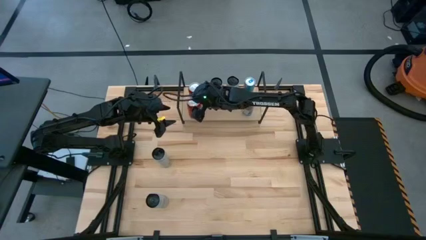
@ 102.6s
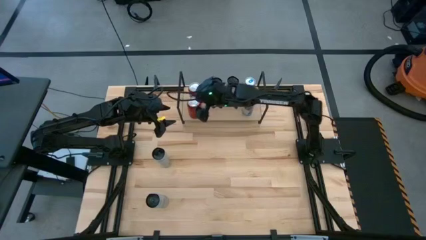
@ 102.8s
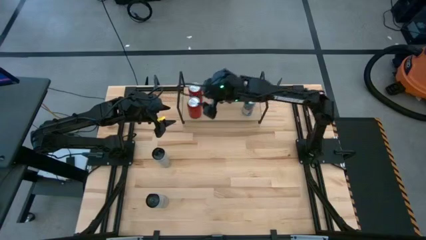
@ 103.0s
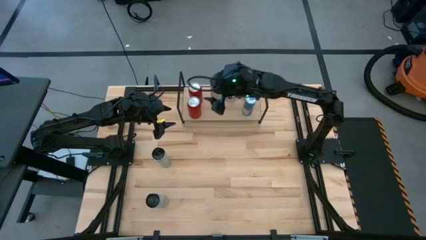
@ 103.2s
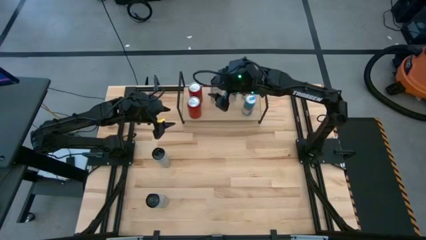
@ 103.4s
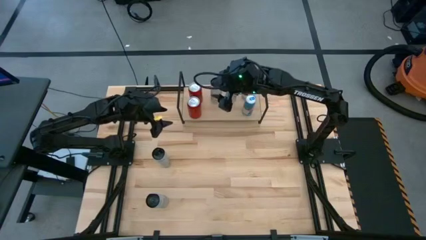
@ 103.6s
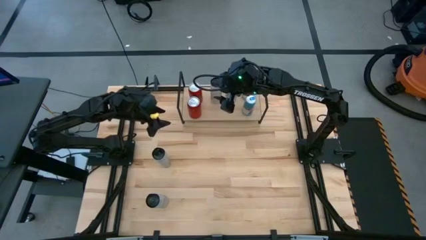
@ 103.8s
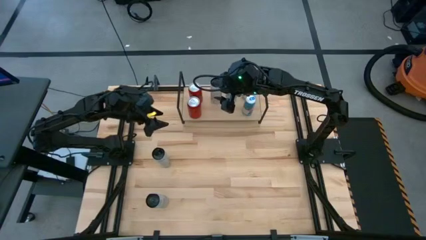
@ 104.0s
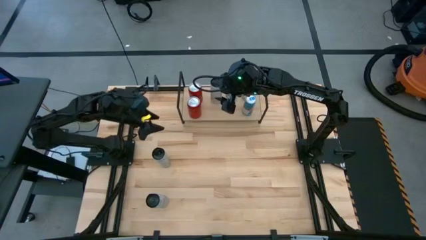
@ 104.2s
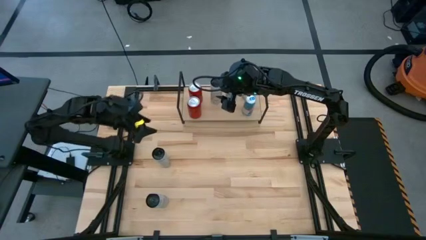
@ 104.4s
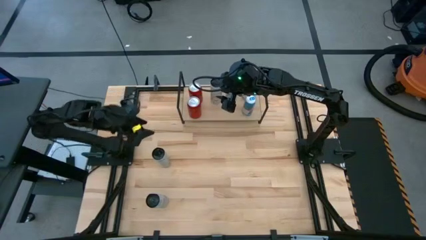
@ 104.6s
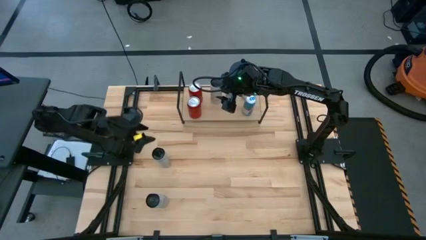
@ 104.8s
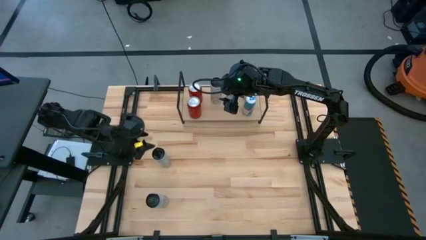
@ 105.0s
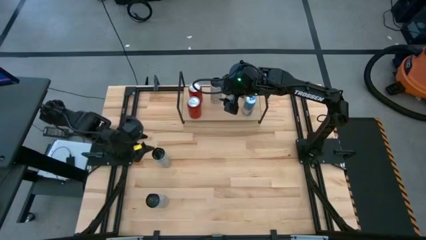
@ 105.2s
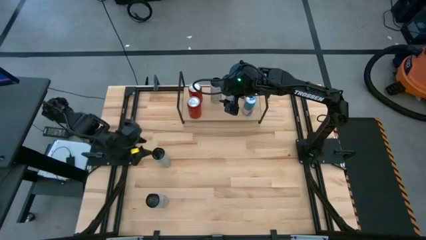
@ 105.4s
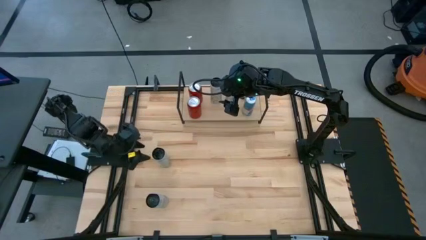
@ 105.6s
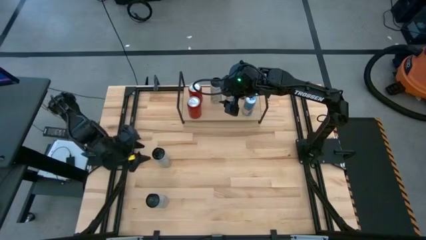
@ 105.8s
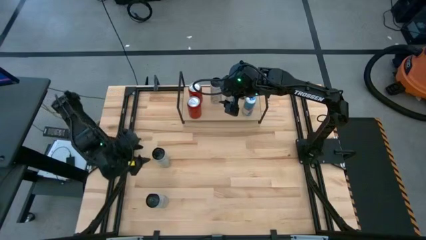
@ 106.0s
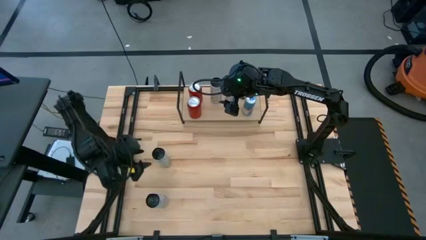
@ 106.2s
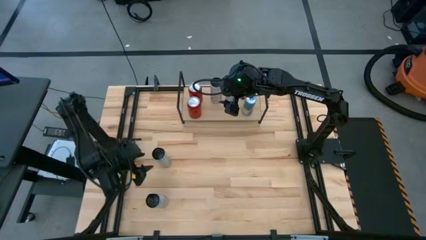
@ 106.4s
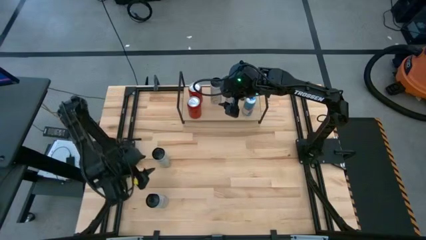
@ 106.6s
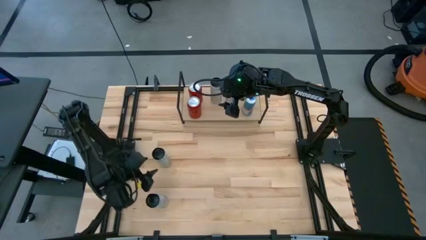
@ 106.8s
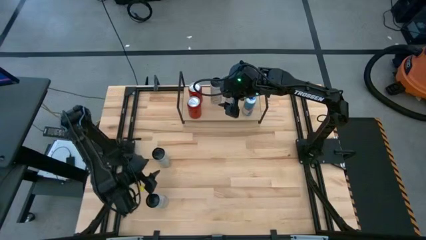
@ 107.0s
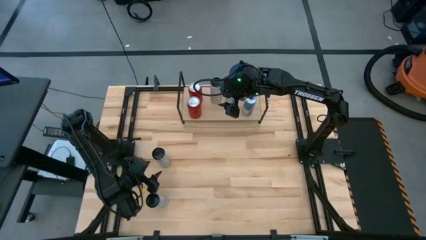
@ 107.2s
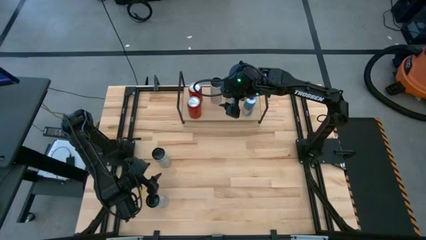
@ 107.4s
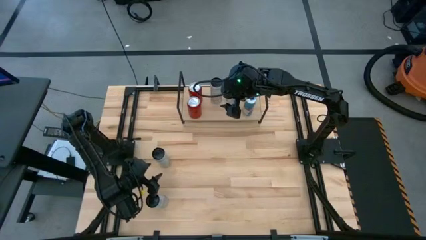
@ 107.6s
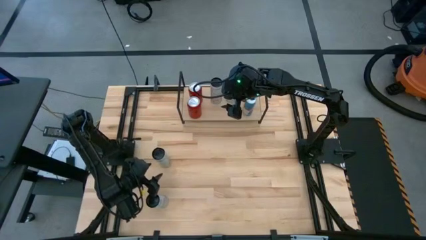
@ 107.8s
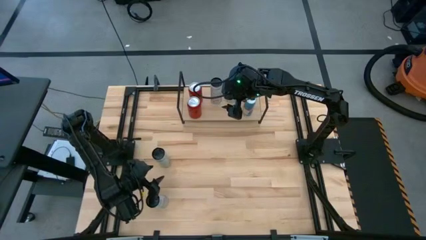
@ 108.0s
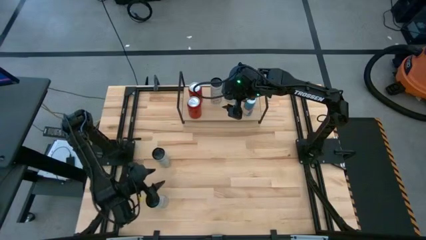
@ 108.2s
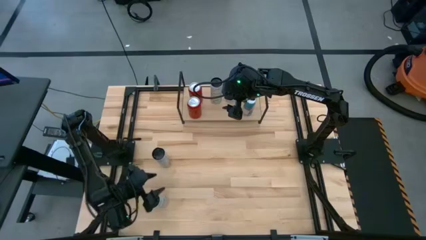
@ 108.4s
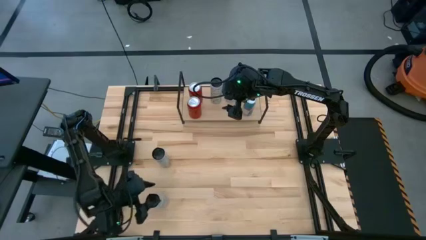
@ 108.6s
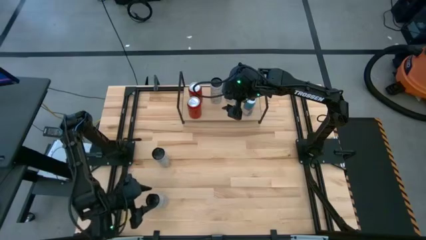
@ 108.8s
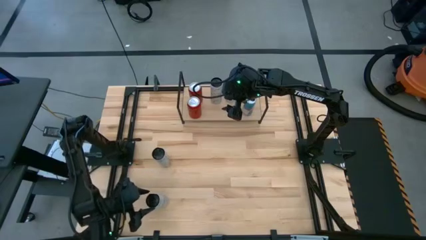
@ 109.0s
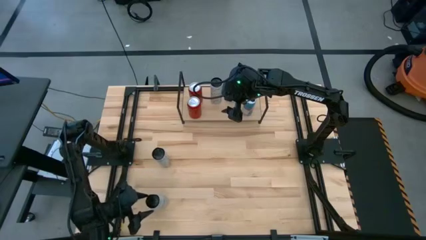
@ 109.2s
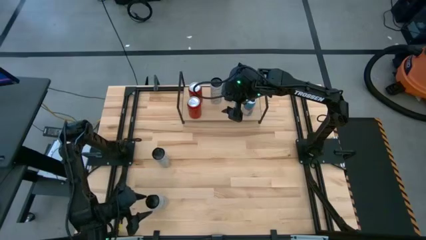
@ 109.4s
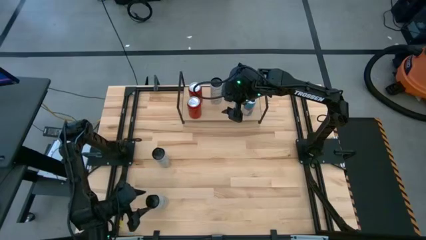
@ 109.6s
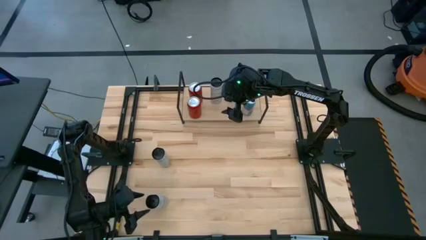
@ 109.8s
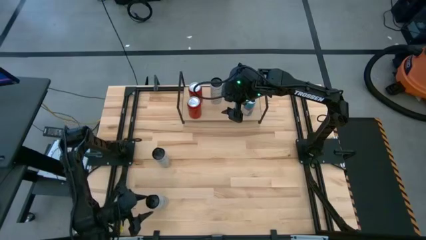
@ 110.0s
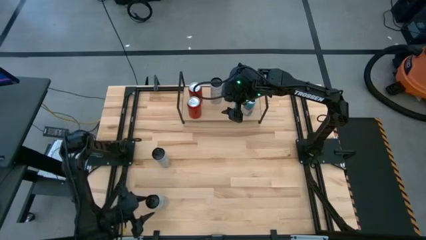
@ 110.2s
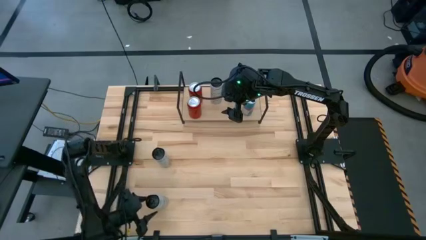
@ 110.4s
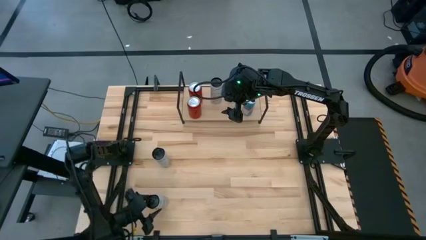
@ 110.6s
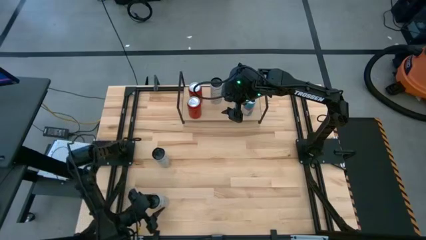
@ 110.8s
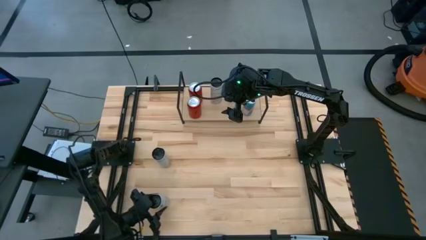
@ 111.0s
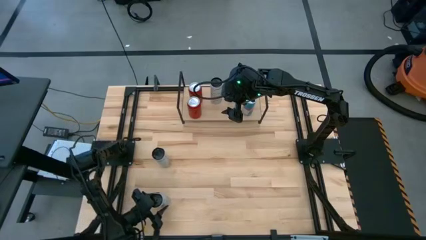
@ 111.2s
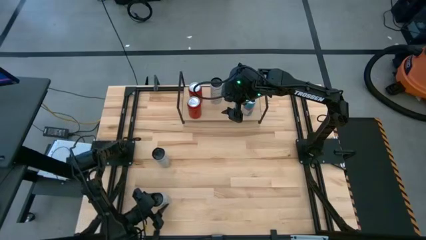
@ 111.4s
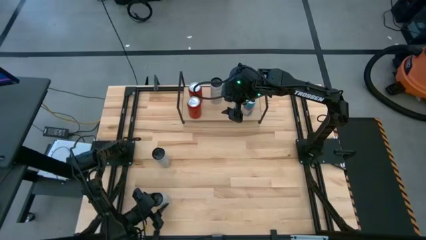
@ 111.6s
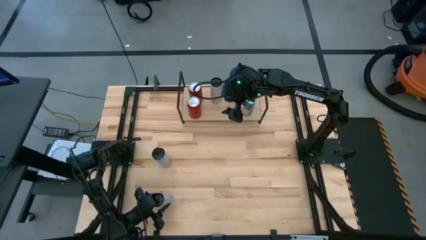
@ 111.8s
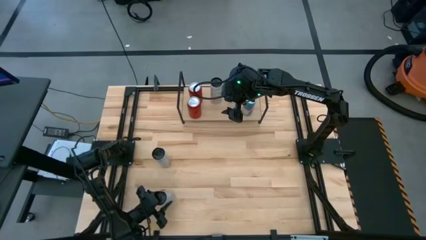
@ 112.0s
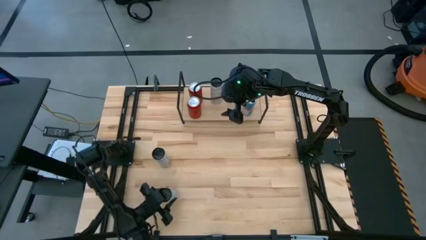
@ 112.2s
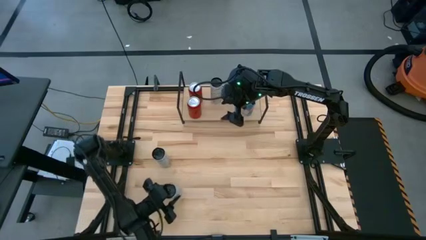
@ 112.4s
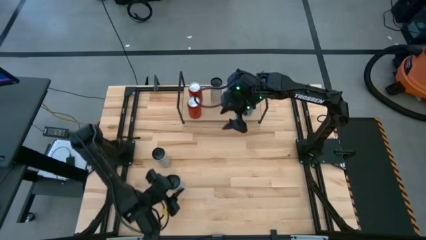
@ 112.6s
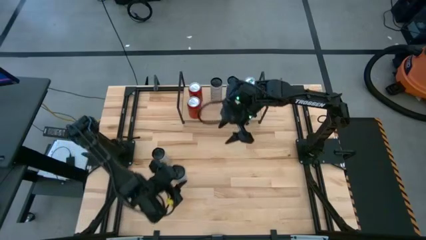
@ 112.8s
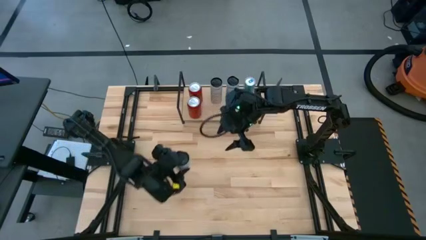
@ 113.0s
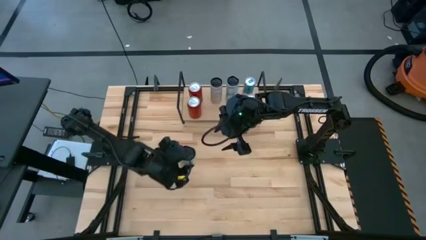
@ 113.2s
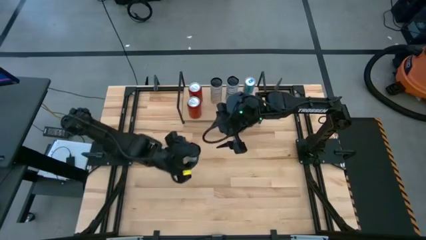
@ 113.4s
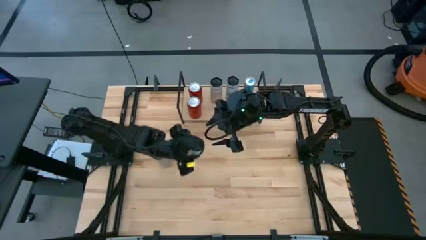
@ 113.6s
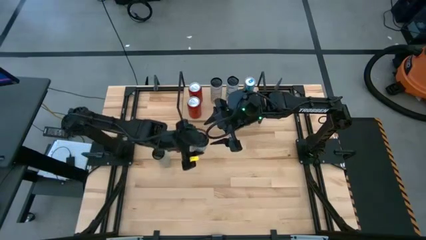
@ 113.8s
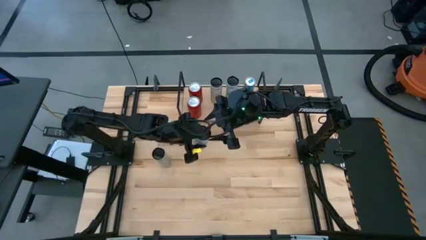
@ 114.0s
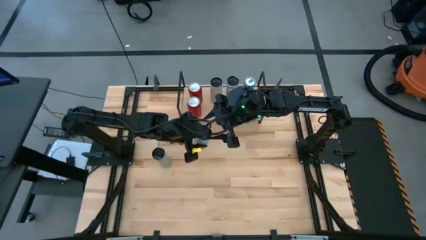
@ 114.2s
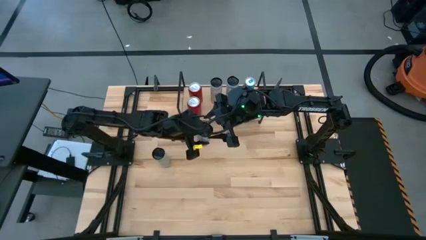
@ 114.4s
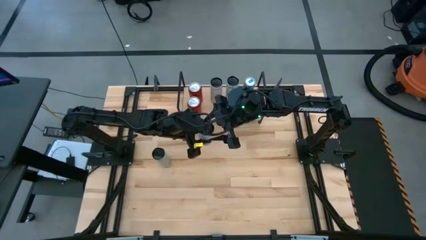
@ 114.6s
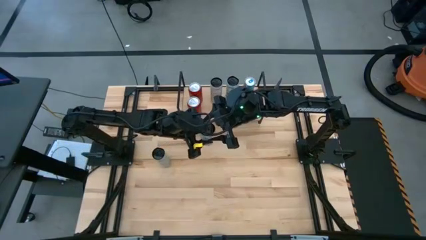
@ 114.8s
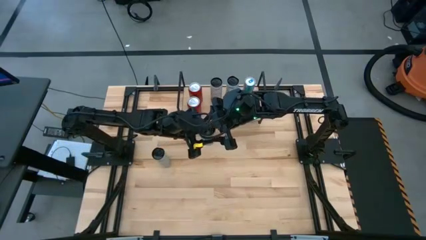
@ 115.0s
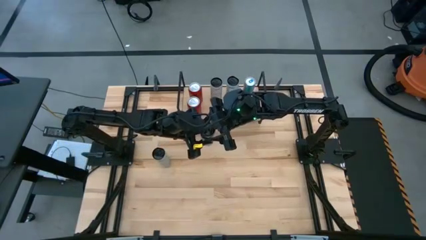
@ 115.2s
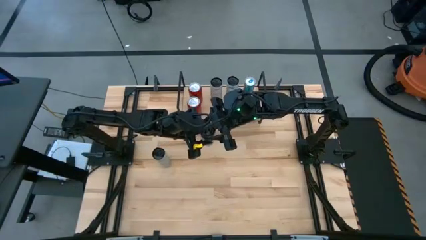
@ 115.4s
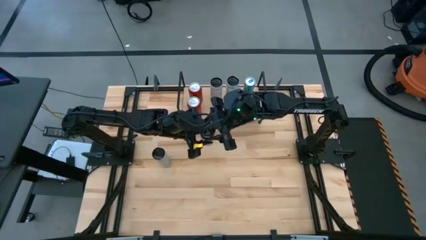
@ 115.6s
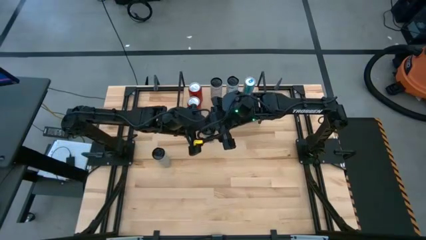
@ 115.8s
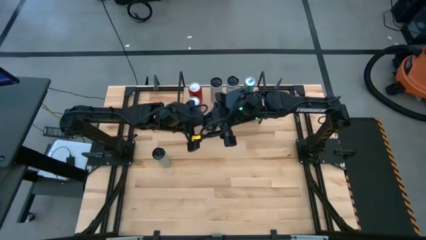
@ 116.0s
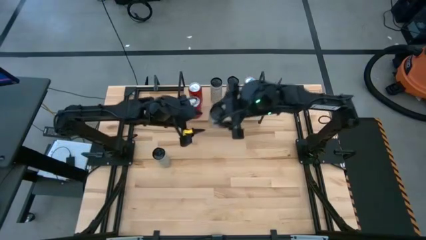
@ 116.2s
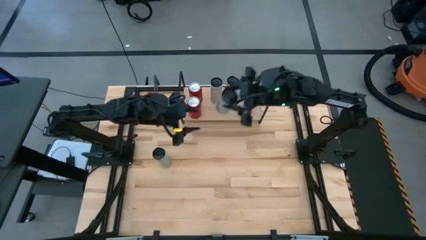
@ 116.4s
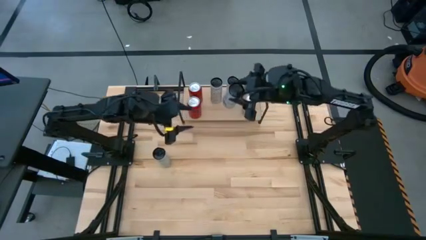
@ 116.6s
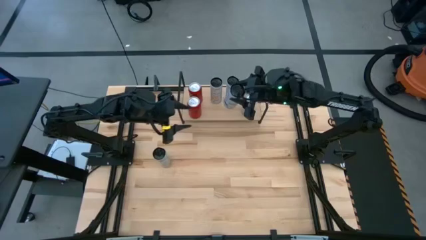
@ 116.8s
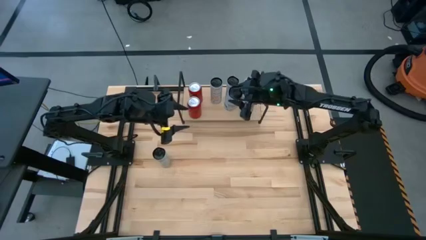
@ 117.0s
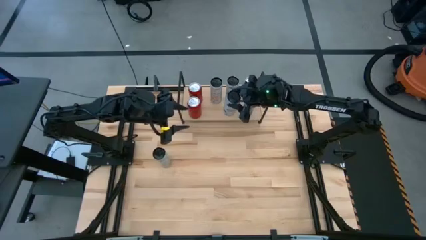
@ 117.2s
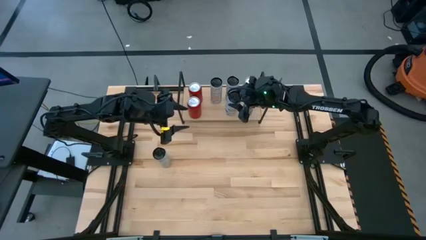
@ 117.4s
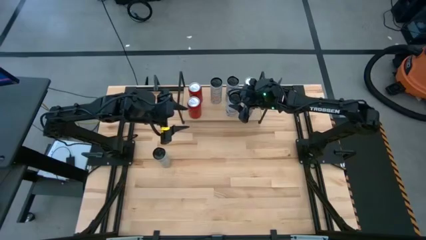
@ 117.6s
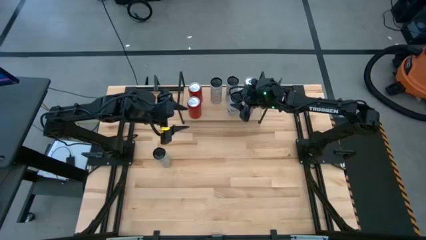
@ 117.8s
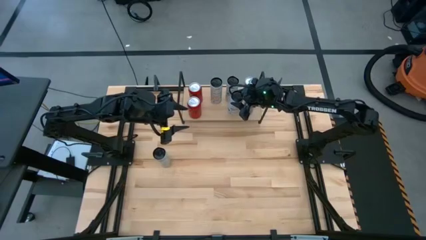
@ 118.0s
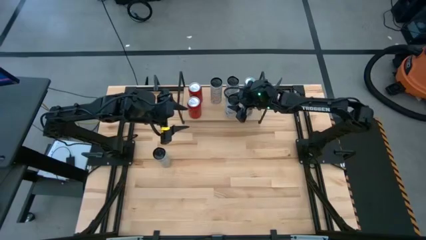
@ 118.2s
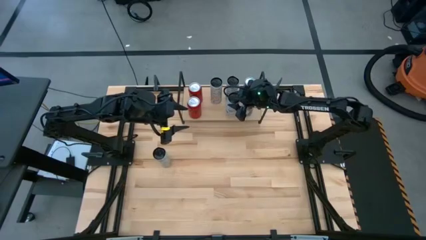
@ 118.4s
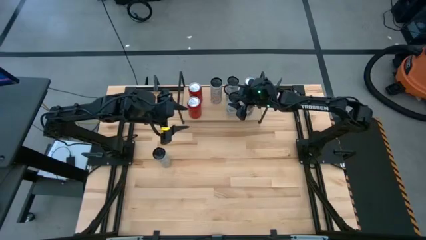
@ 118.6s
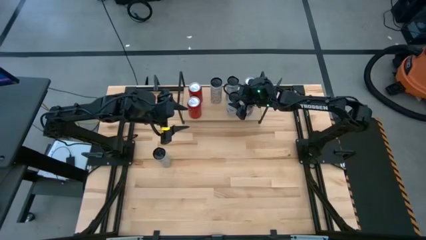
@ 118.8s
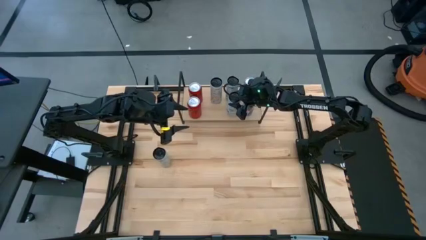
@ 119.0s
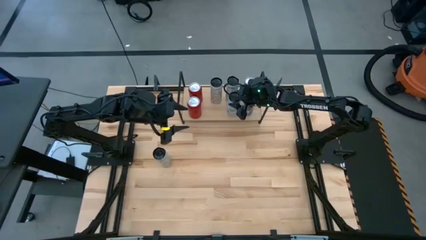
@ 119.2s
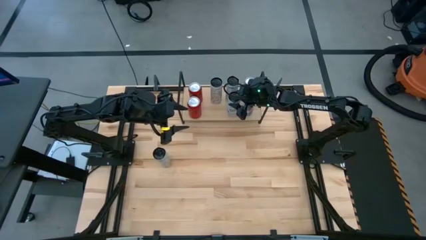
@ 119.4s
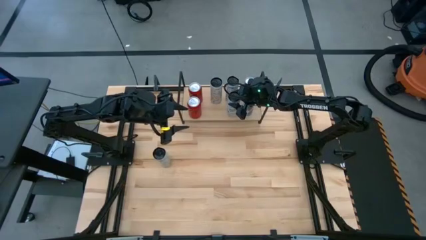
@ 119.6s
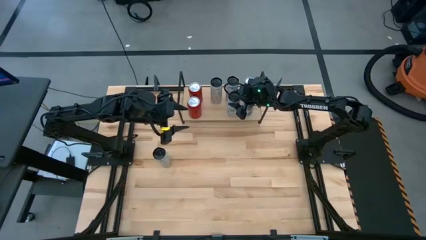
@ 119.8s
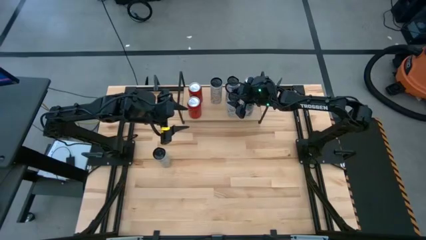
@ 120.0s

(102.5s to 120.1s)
Task: Place canned beverage on shelf
Put the bottom black soda can on the shelf aligned with the other light blue soda can
